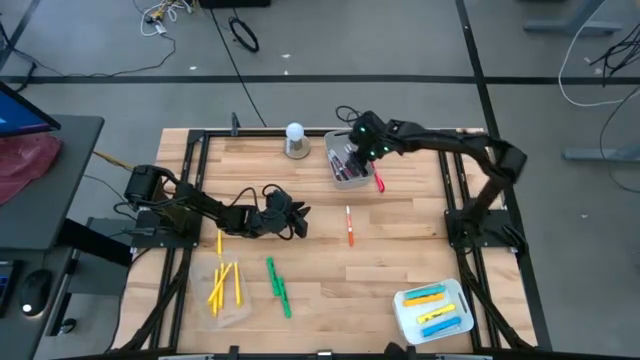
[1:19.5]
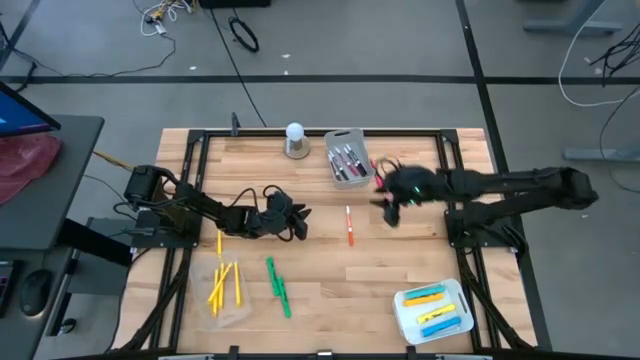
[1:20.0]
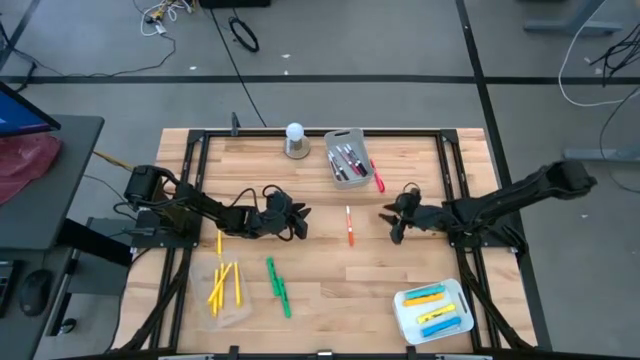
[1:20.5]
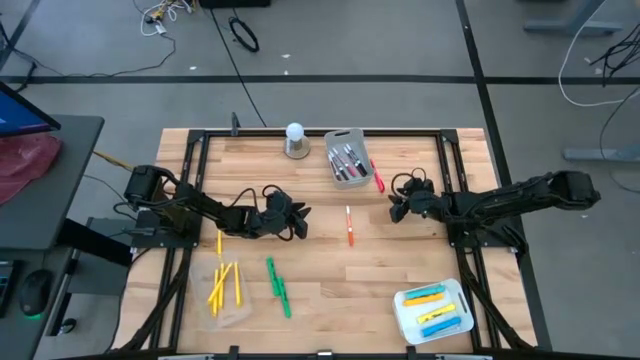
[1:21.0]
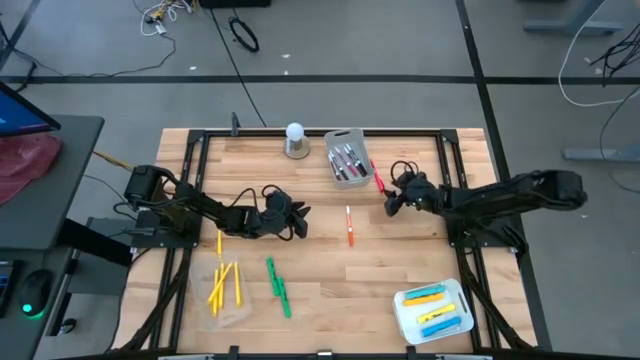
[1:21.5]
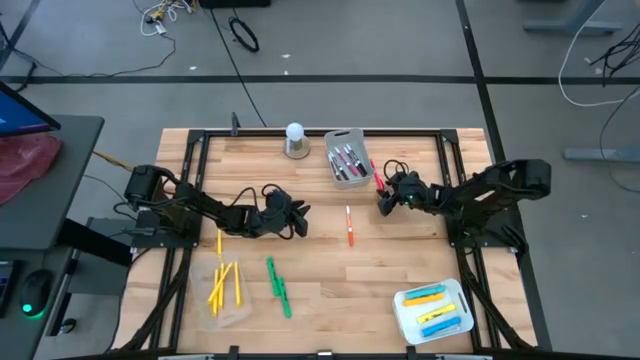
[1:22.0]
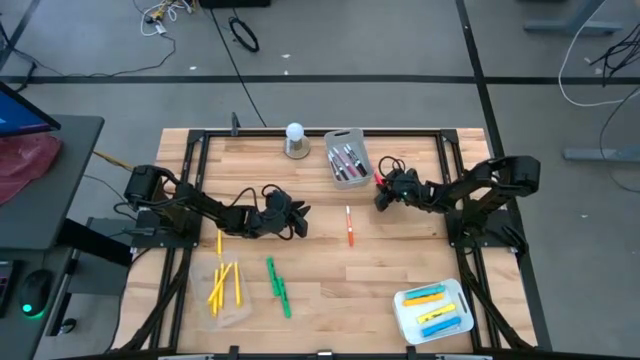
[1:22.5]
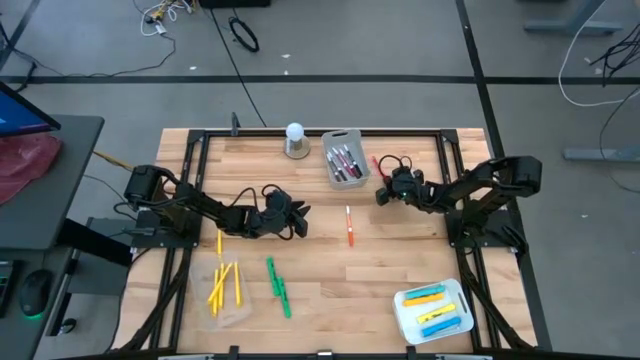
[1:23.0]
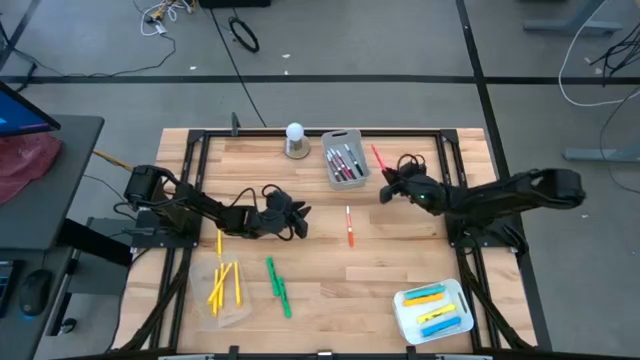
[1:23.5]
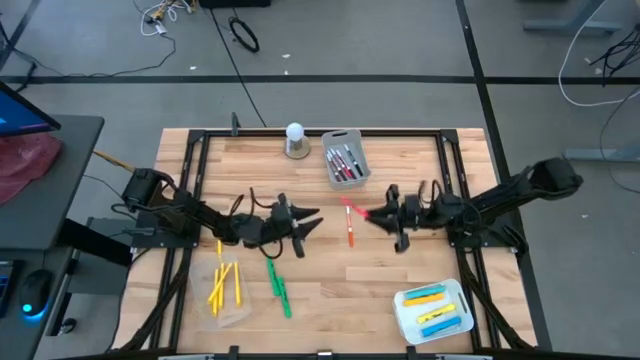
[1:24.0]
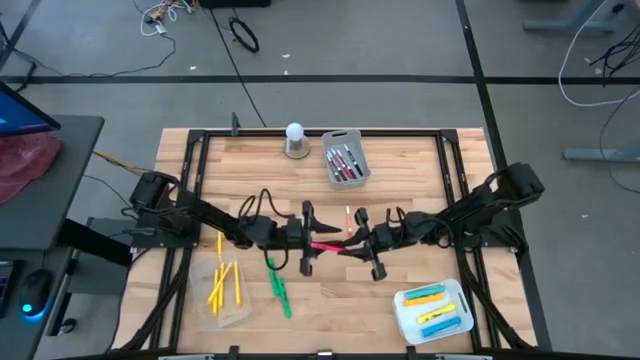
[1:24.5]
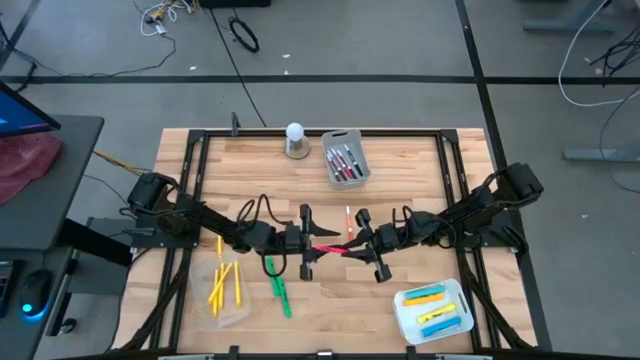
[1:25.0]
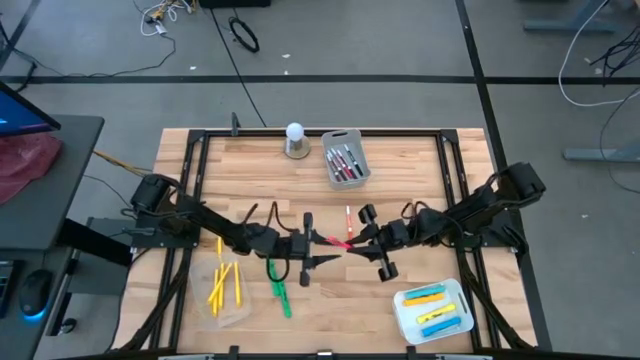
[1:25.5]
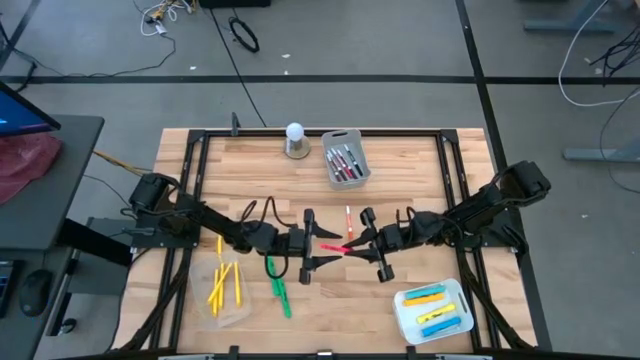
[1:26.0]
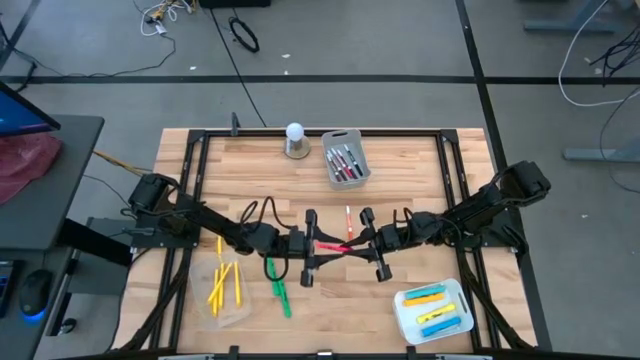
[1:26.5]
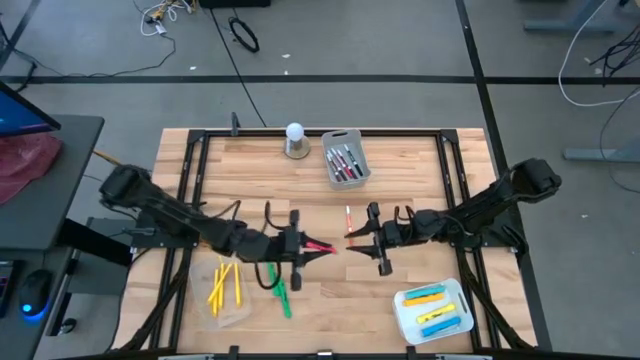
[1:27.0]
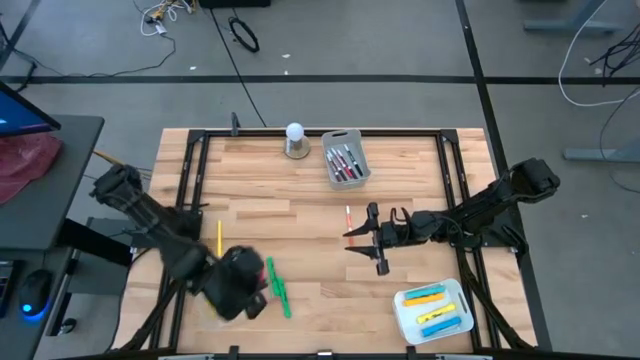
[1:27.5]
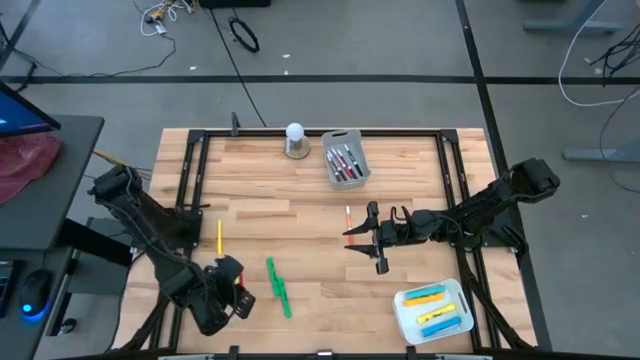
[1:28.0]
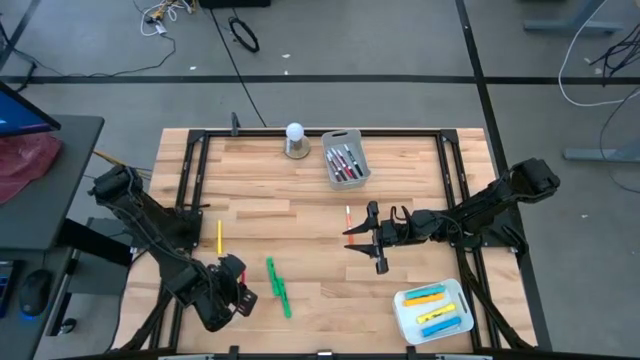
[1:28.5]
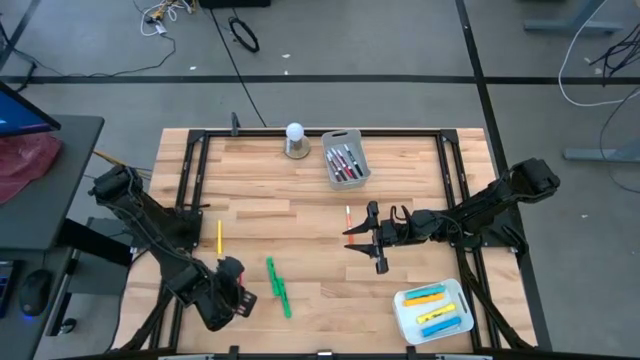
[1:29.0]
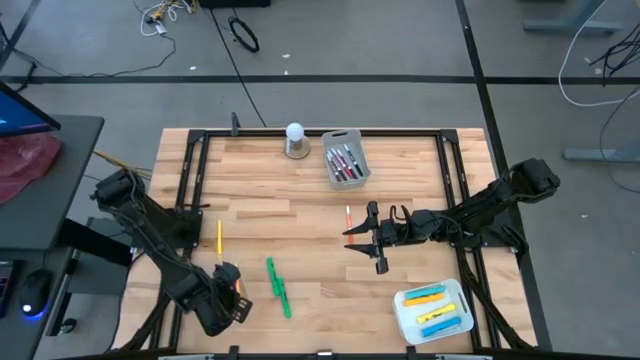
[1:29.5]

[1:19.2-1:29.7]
Task: Pick & Place Markers
Put the pink pen into the transparent bin

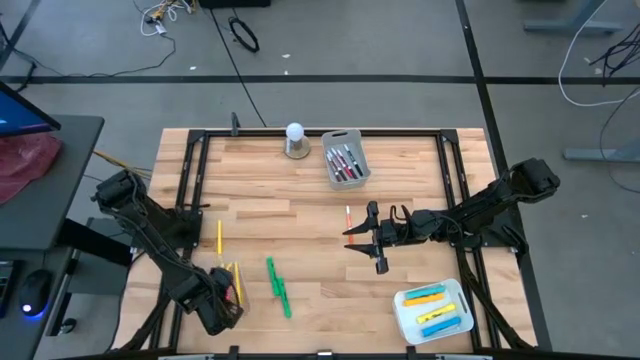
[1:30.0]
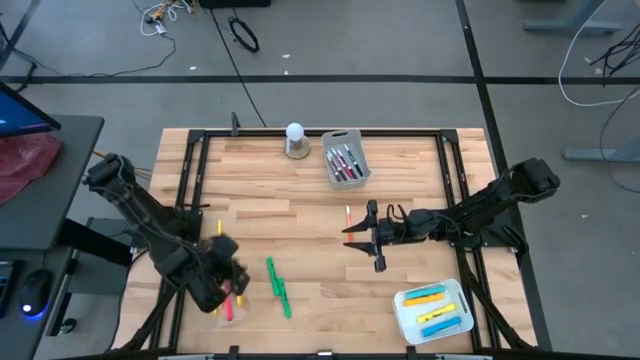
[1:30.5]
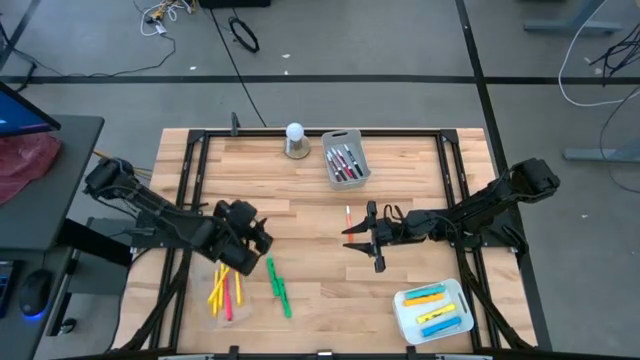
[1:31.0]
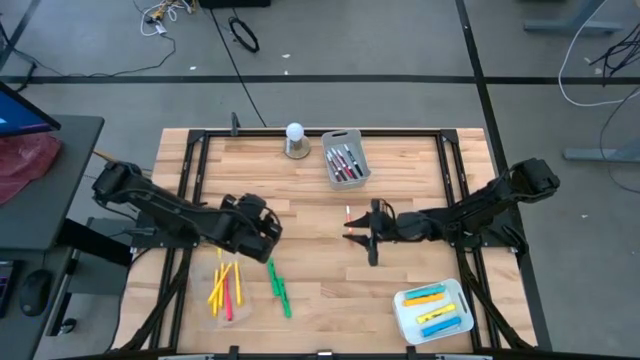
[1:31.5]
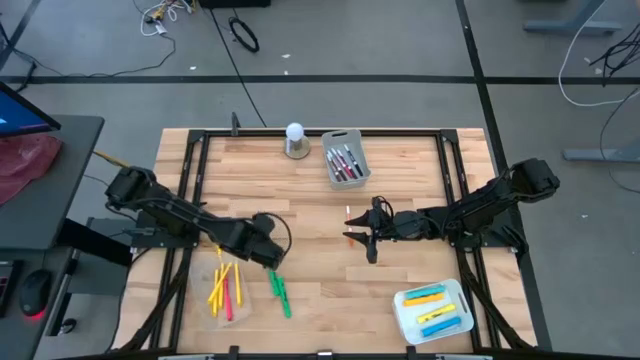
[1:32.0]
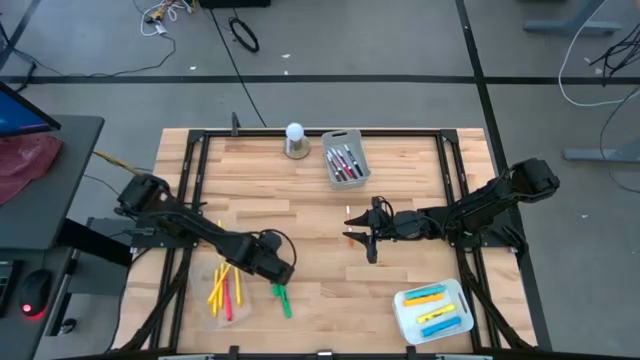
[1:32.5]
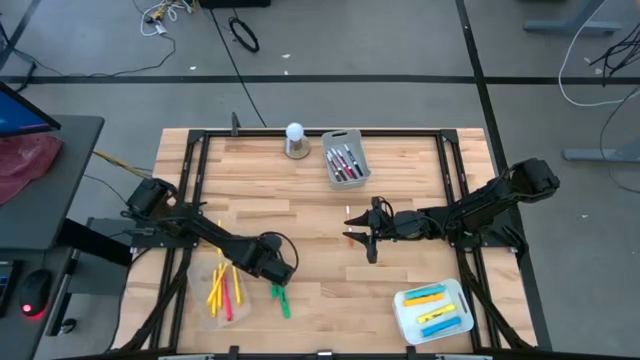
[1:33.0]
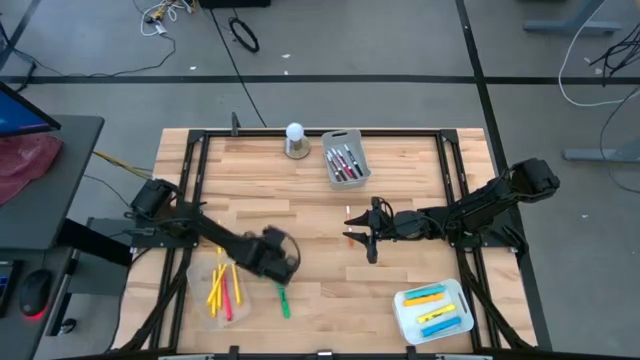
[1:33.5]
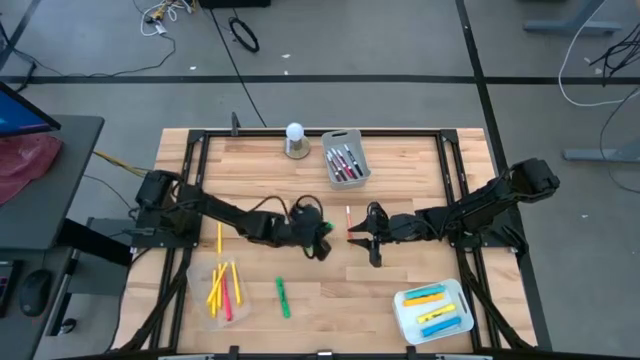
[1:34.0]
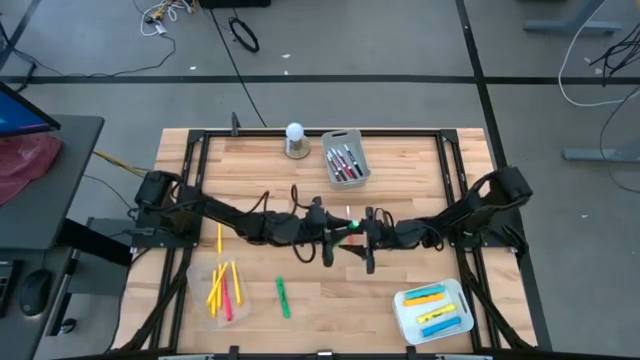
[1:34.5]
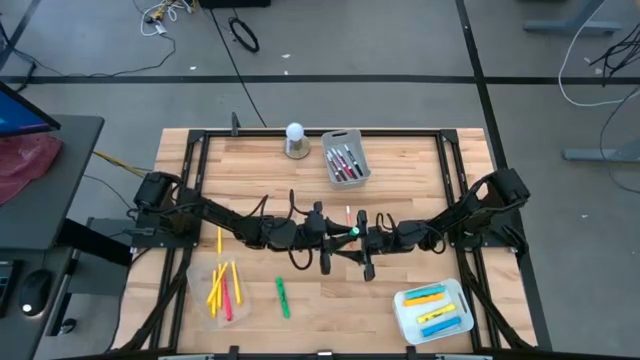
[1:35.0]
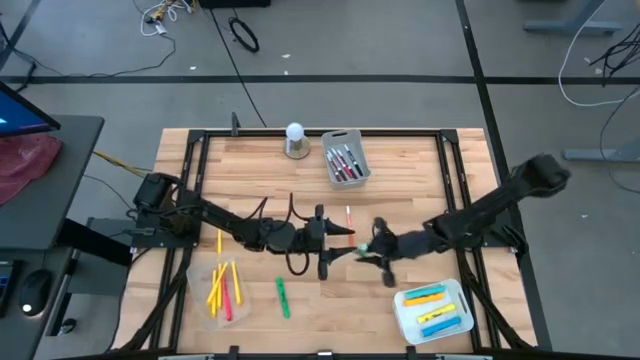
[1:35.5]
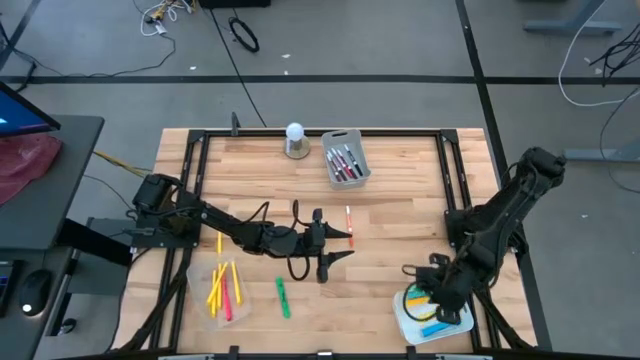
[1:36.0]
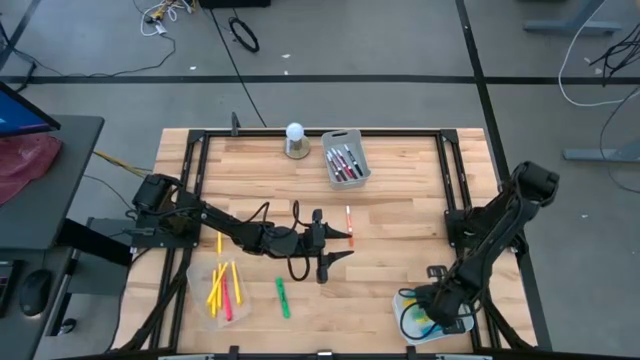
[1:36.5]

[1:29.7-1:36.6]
Put the green highlighter pen into the white bin

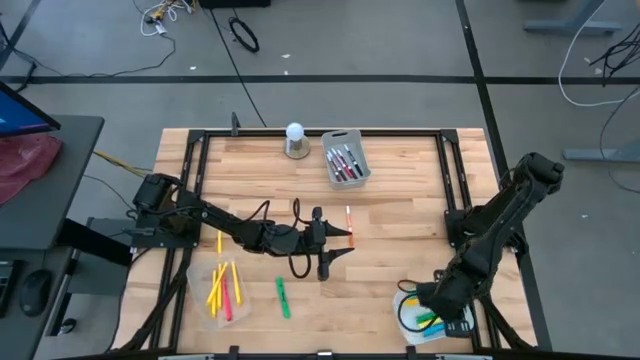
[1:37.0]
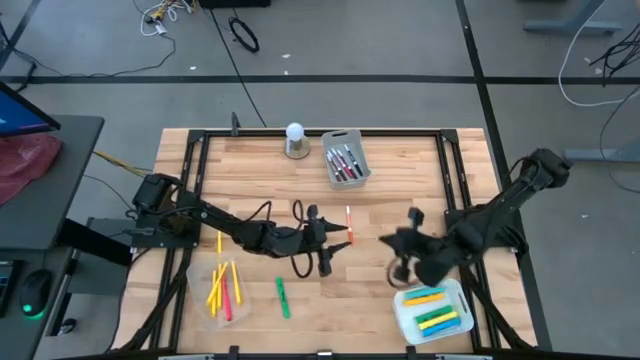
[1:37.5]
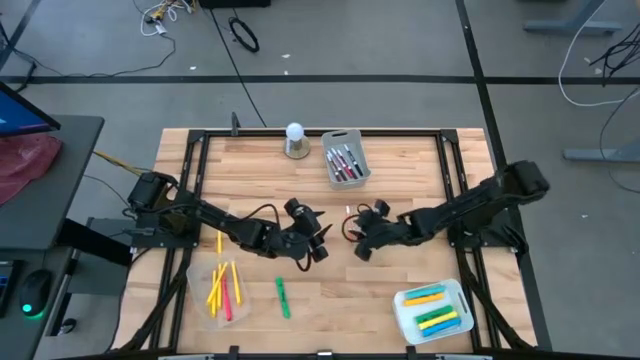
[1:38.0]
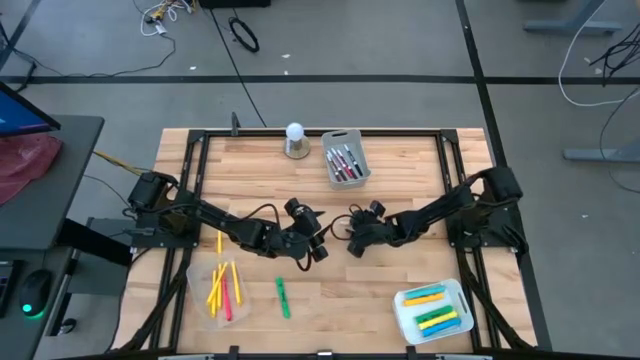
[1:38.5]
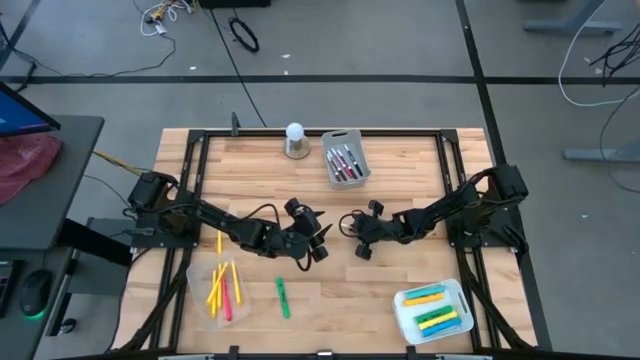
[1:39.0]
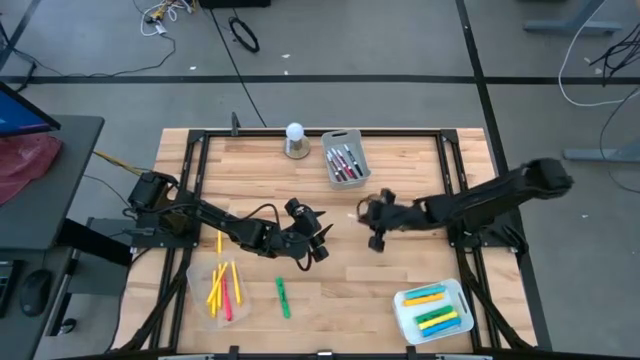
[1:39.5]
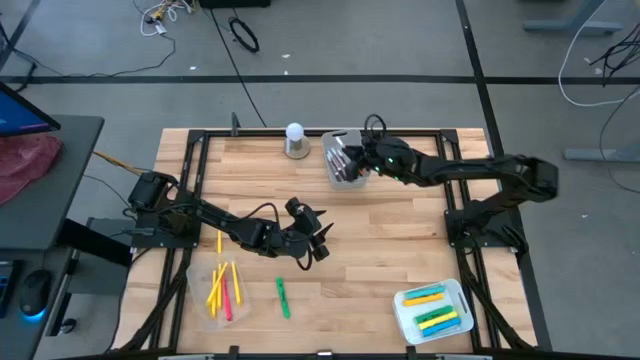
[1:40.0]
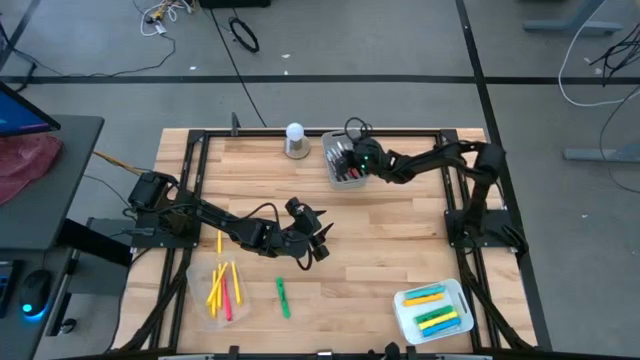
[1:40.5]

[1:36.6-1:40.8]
Put the orange highlighter pen into the gray bin
